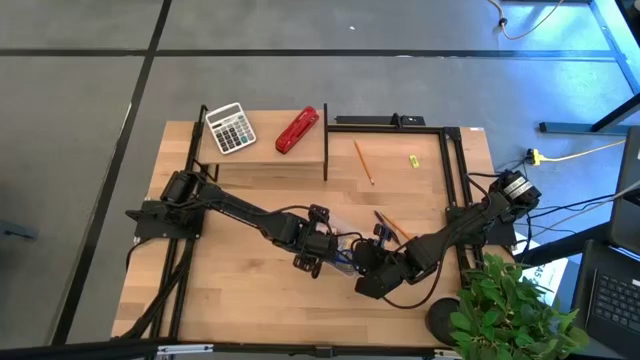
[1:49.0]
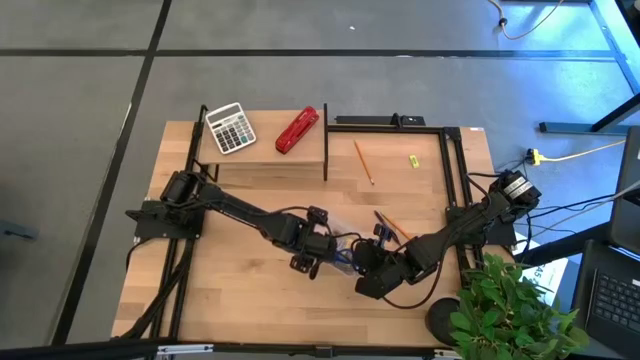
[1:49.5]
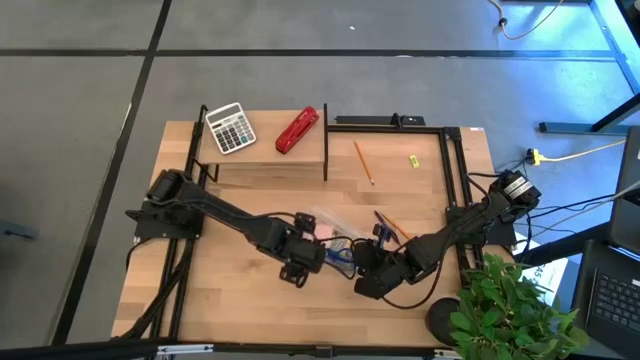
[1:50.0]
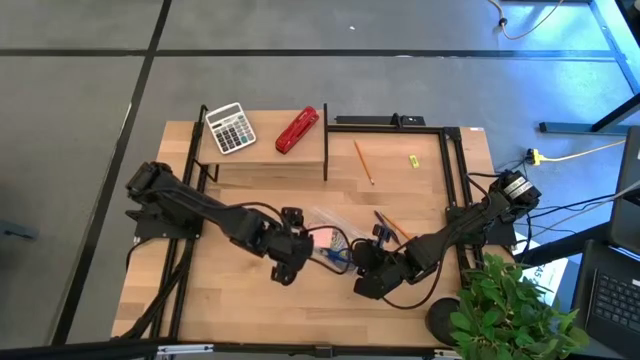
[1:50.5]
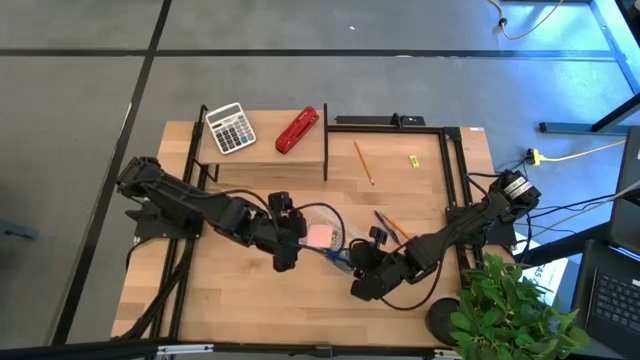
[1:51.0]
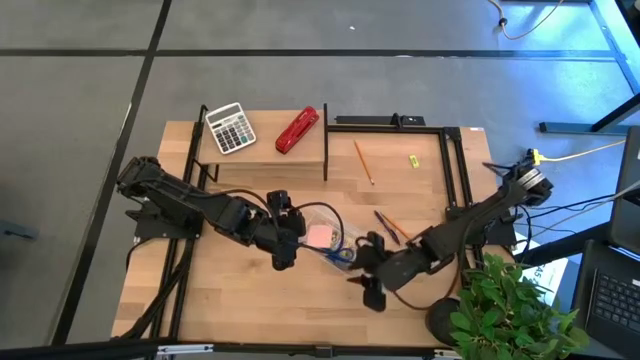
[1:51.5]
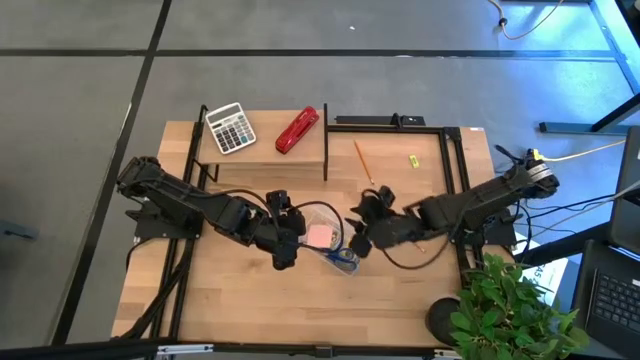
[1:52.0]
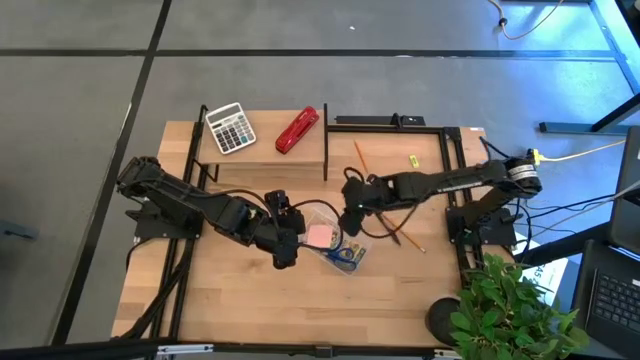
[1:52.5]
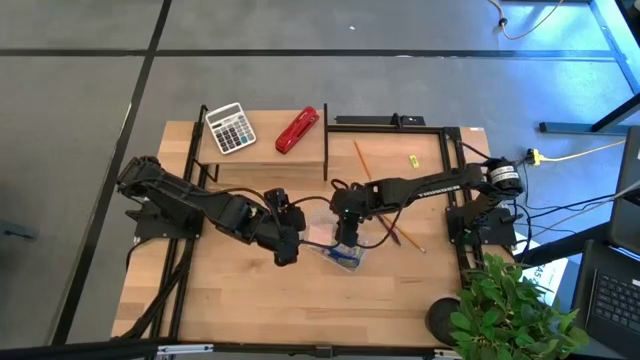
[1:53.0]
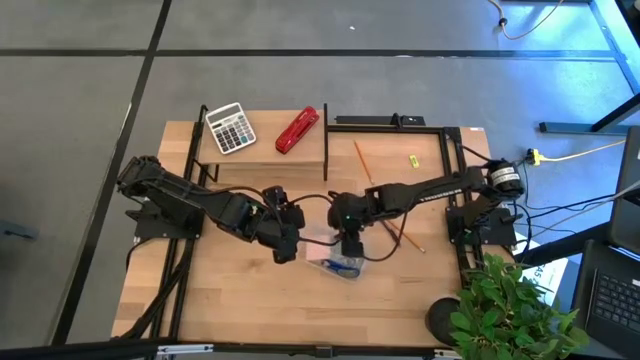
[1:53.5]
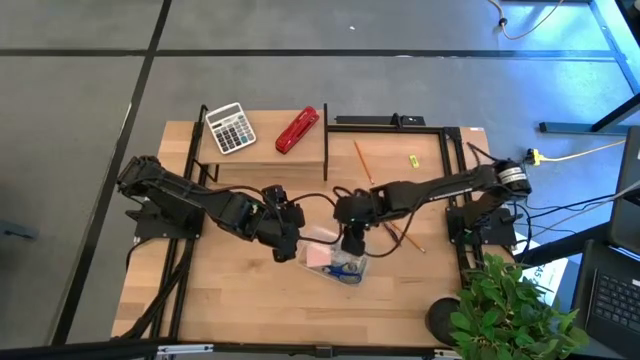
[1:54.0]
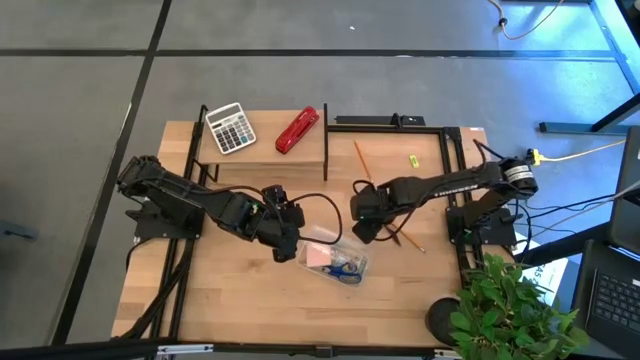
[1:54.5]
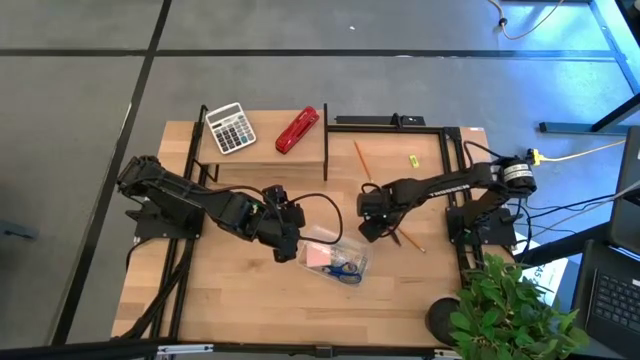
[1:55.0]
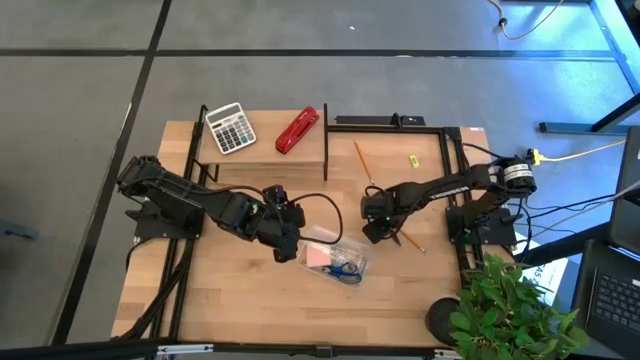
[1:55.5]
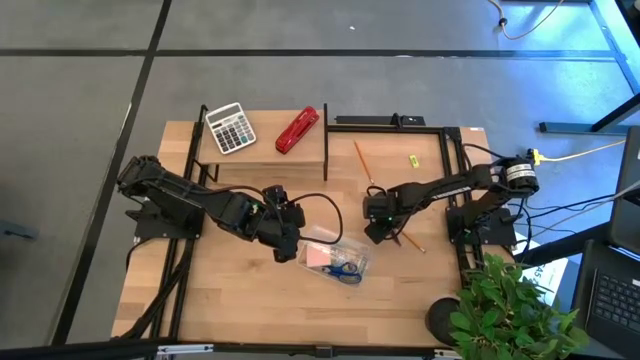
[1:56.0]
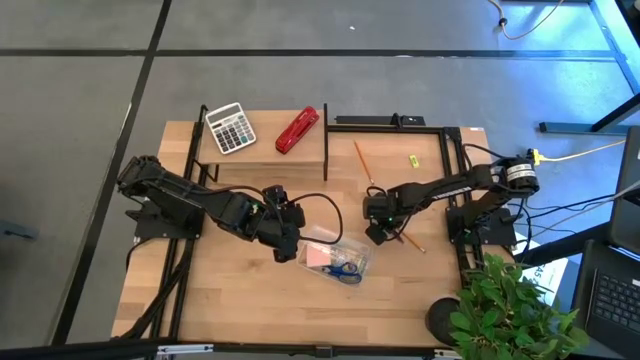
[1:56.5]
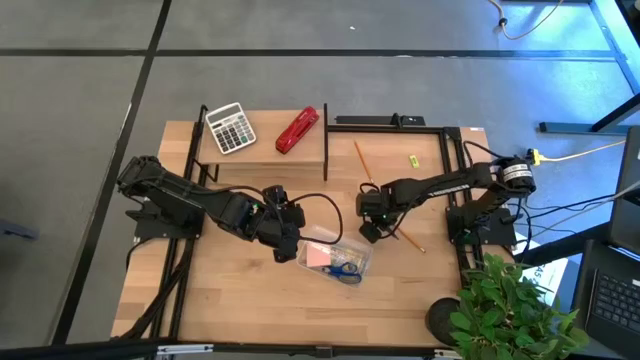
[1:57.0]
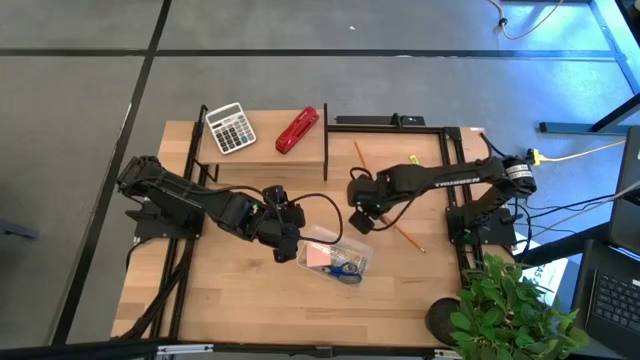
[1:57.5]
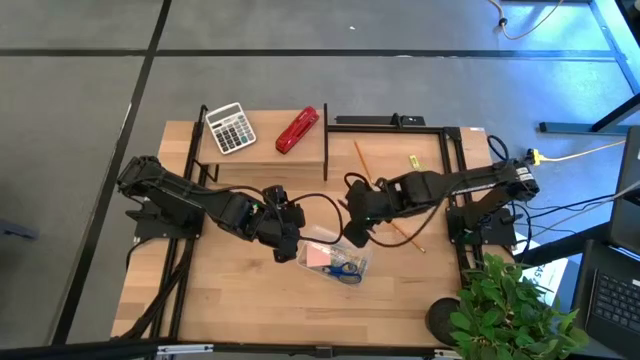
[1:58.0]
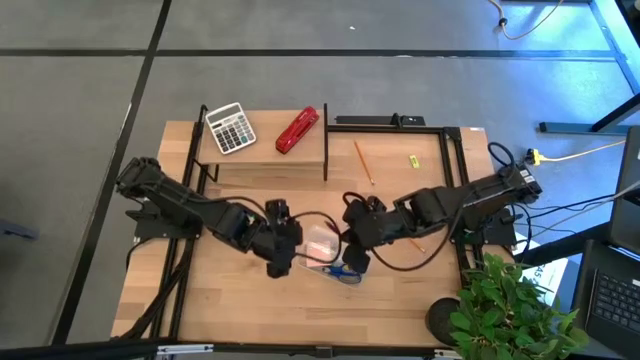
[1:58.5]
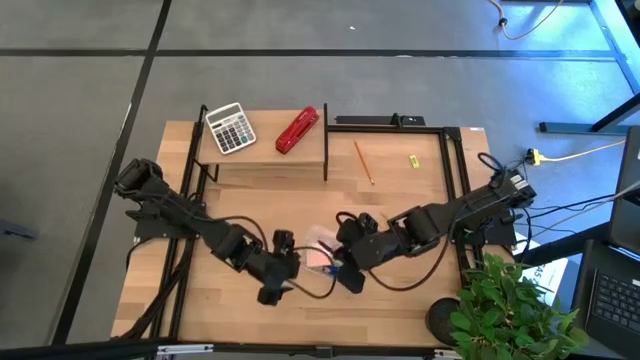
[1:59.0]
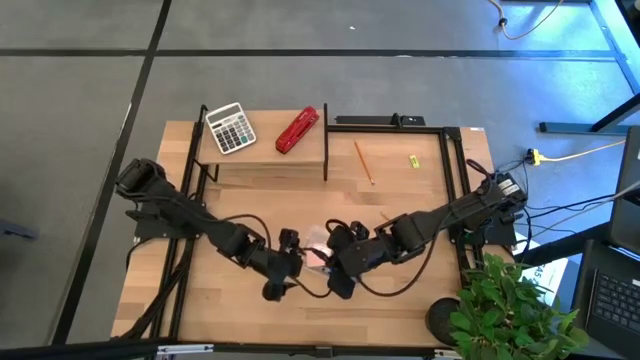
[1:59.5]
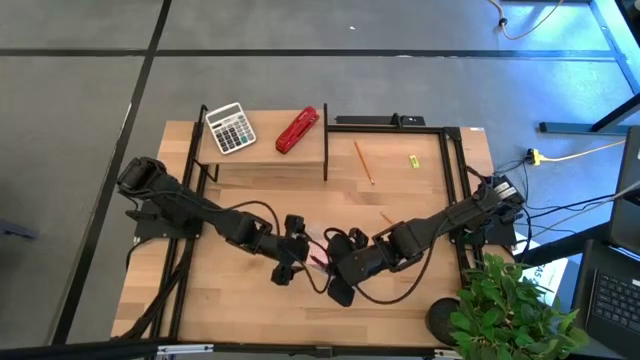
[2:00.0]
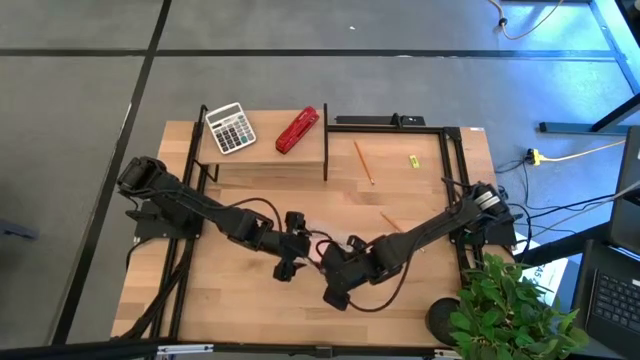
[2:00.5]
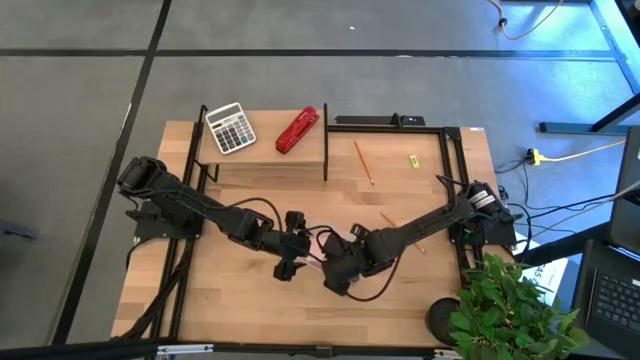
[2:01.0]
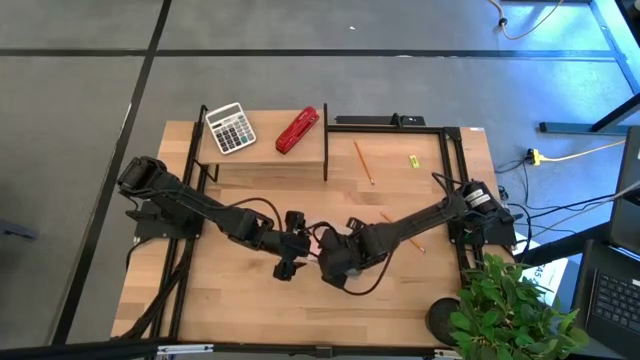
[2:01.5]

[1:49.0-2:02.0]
Task: Pack school essentials
Put the blue pen into the transparent supply box
